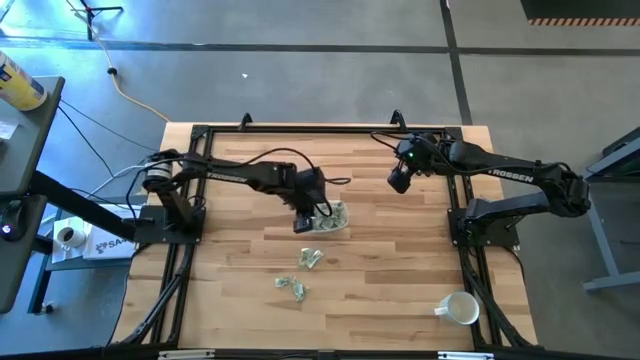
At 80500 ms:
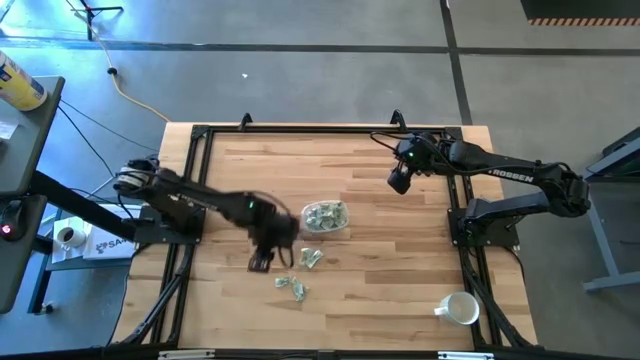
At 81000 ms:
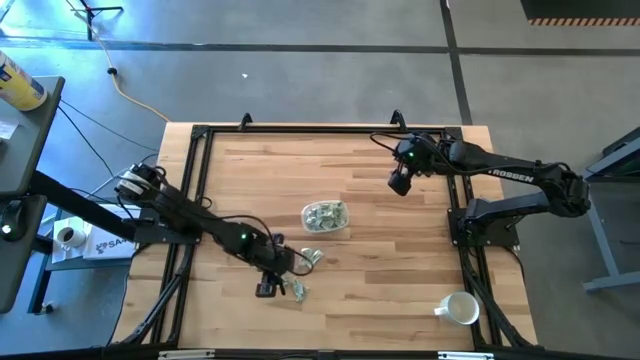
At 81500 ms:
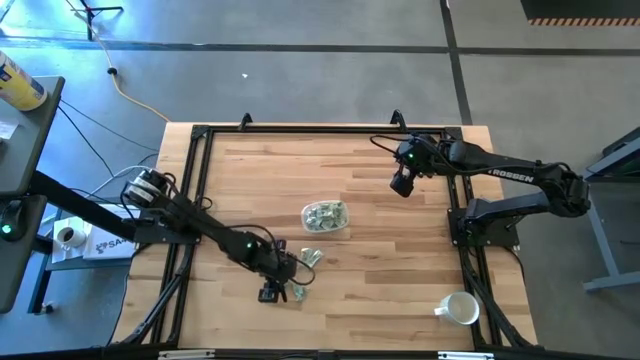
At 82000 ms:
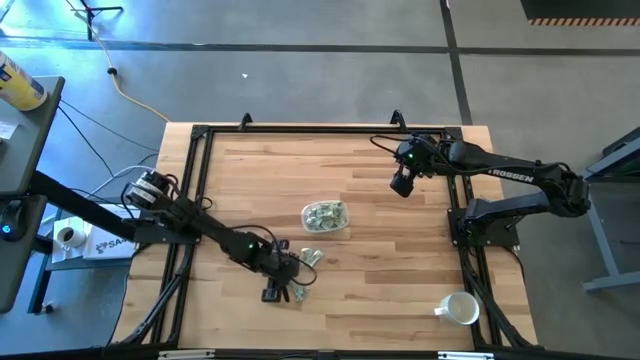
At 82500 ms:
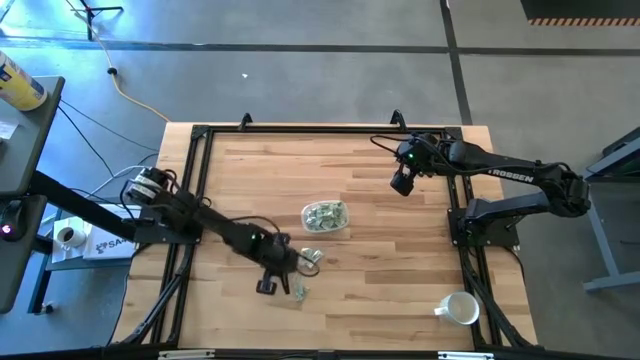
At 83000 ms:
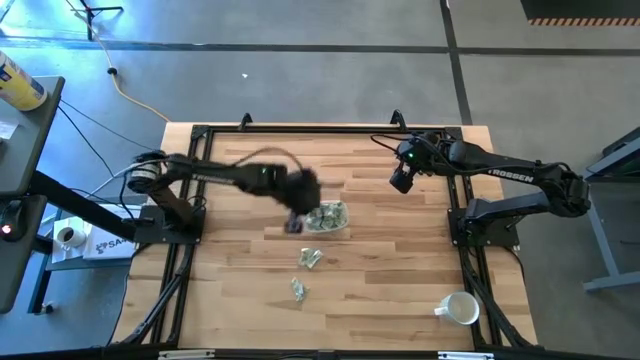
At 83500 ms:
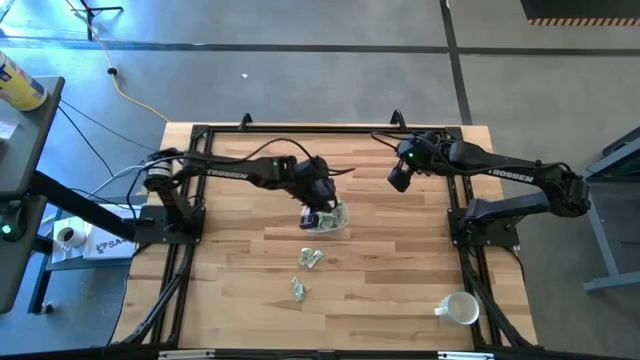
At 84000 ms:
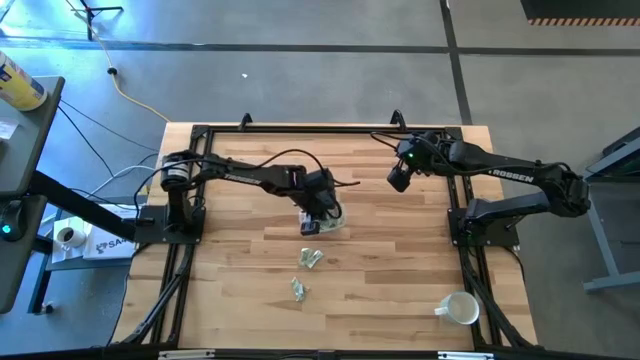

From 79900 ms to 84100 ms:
Task: Pick and place Stevia / Truvia into bins
Put the stevia packet into the transparent container

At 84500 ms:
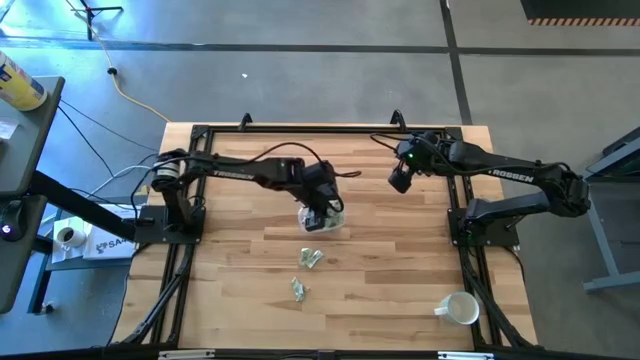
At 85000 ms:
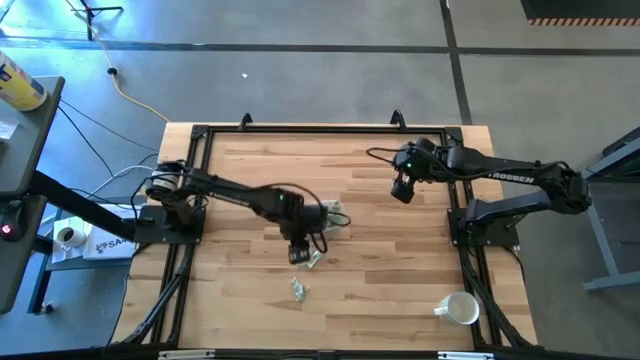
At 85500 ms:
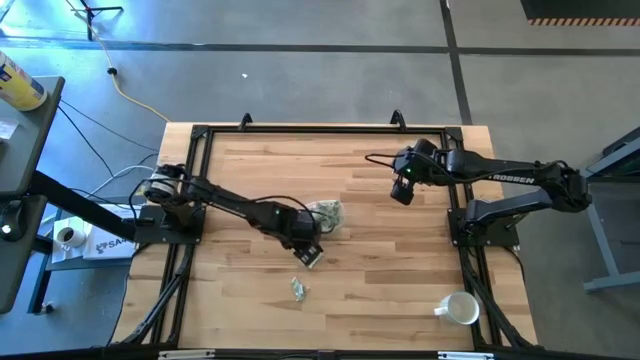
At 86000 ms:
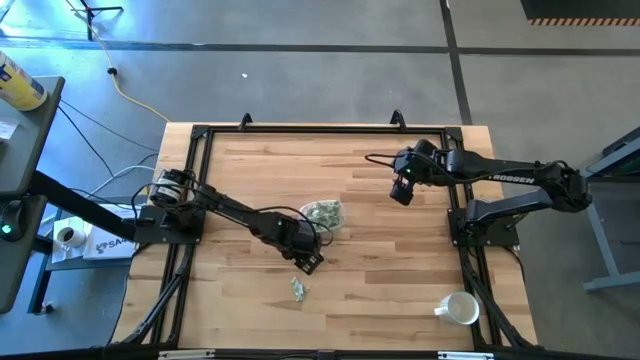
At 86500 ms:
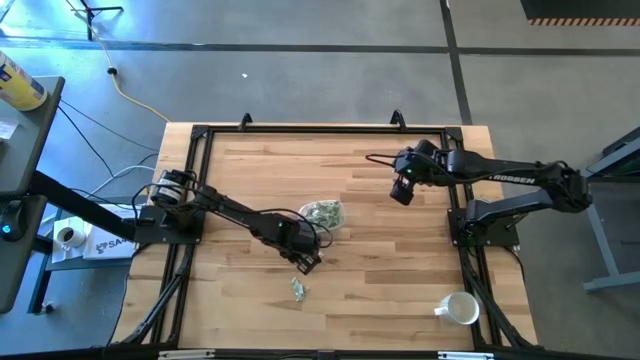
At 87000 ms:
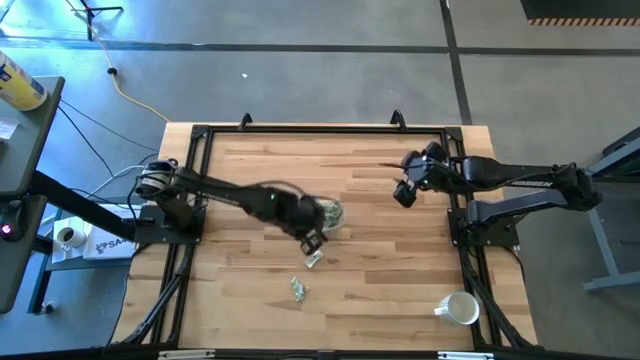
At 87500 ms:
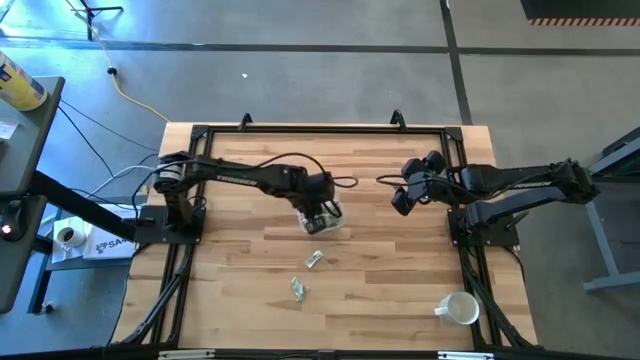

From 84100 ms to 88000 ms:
Put the stevia packet into the transparent container

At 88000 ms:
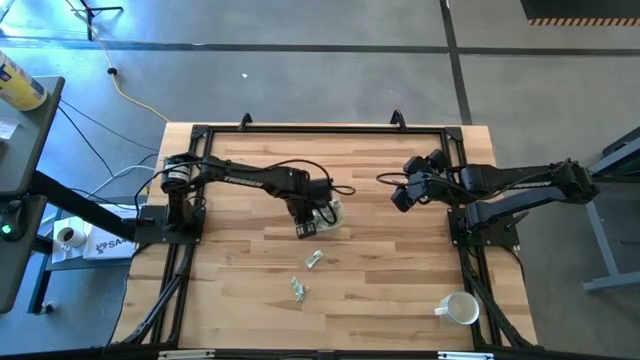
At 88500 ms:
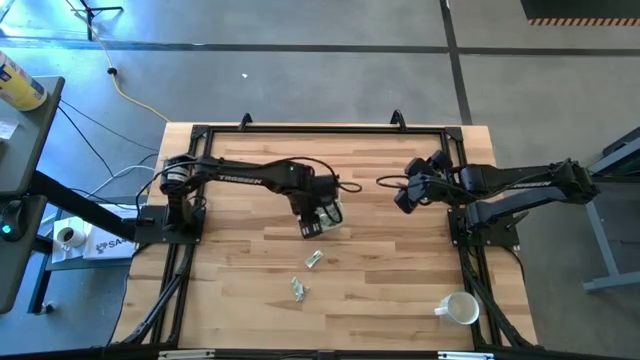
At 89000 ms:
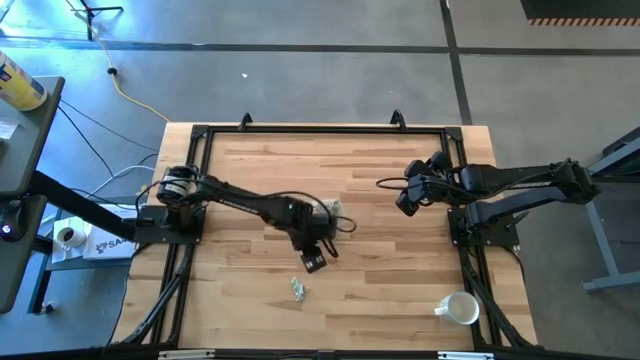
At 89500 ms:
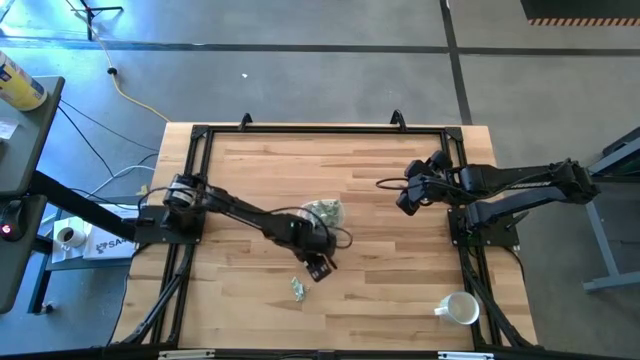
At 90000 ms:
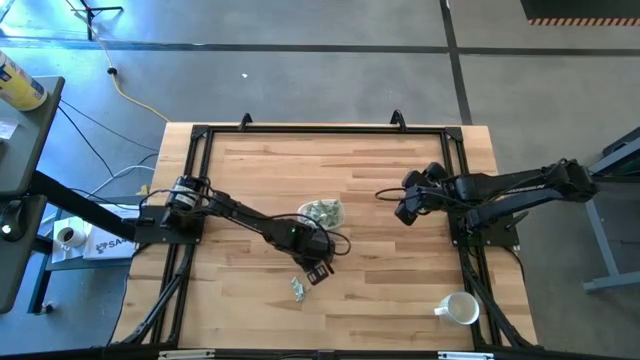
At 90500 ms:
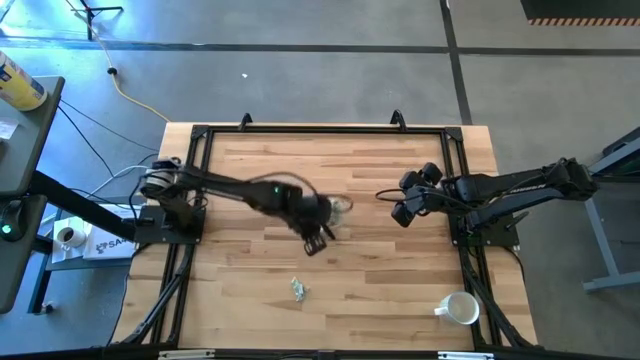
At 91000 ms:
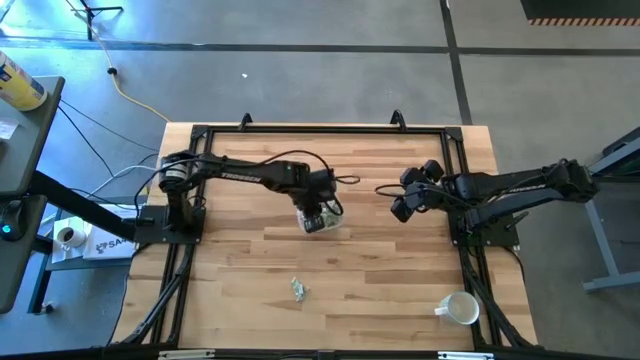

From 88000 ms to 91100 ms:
Put the stevia packet into the transparent container

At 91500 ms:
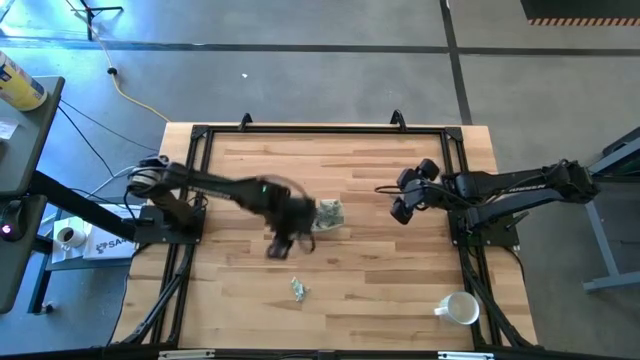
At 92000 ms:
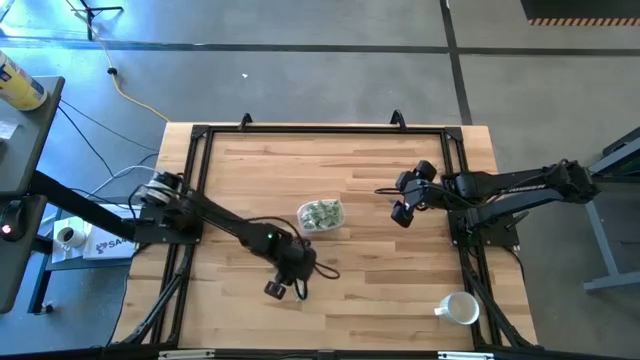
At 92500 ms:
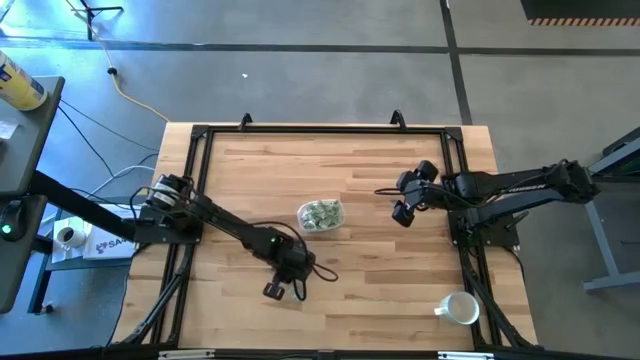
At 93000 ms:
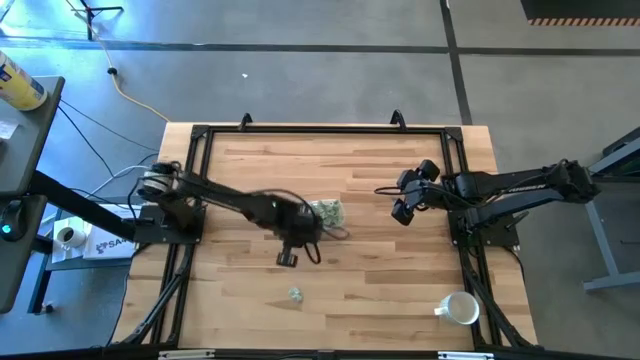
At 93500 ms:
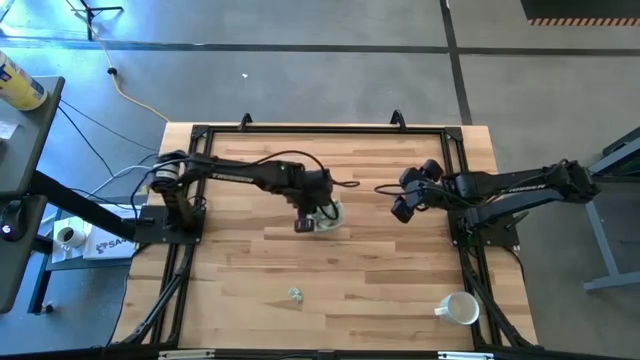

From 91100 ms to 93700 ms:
Put the stevia packet into the transparent container

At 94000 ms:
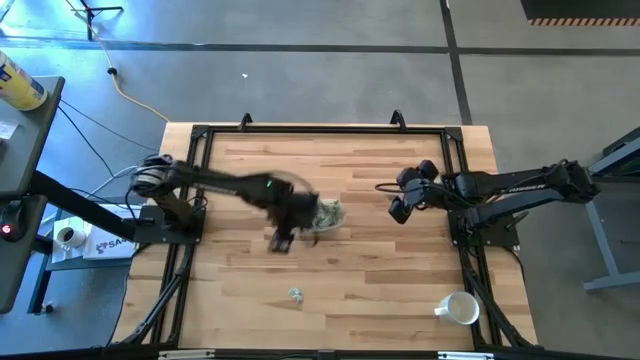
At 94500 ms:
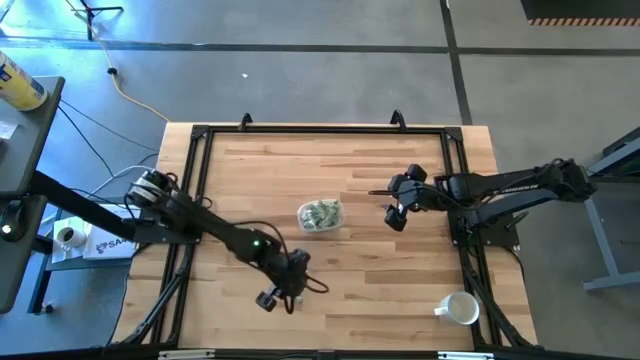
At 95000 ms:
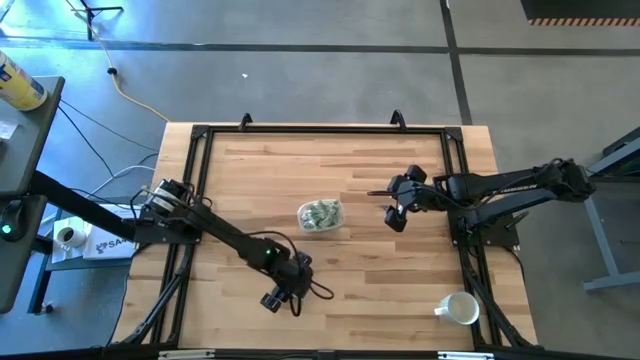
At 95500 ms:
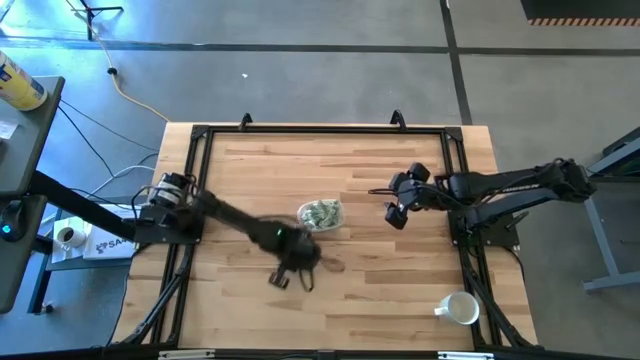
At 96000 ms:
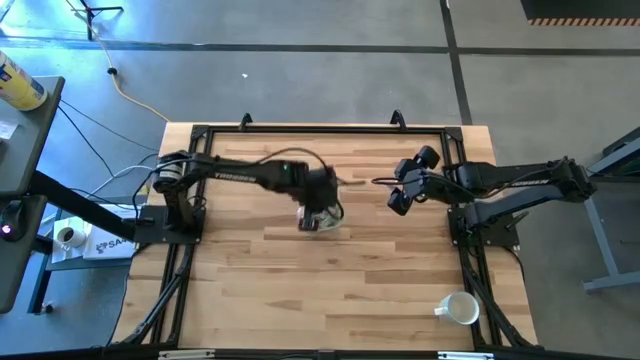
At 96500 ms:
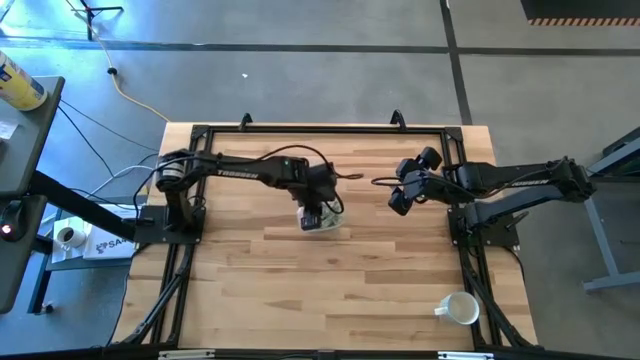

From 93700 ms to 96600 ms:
Put the stevia packet into the transparent container

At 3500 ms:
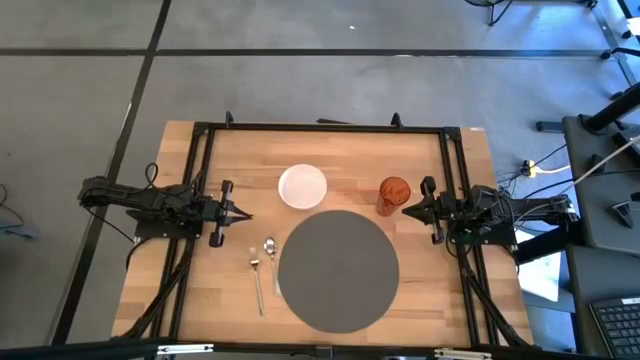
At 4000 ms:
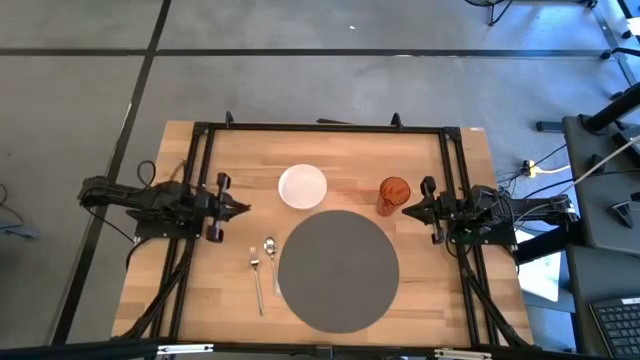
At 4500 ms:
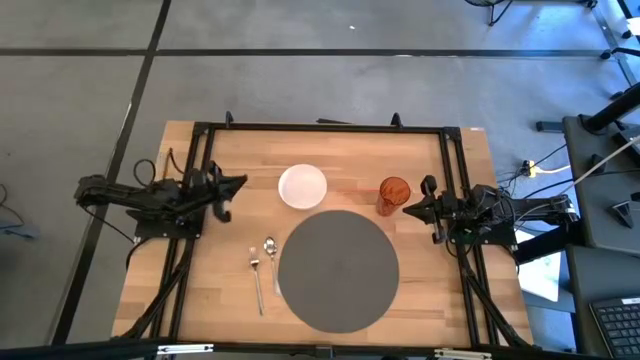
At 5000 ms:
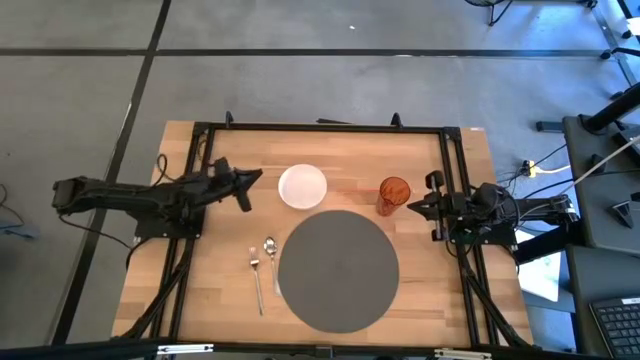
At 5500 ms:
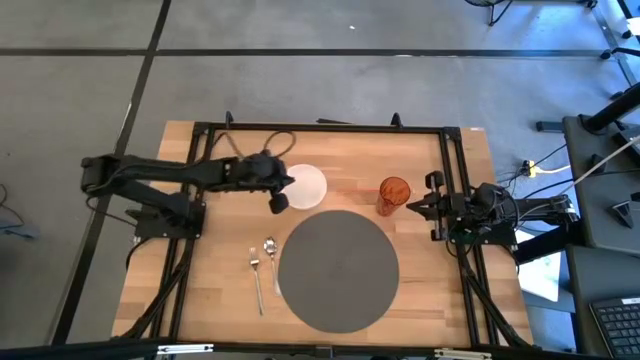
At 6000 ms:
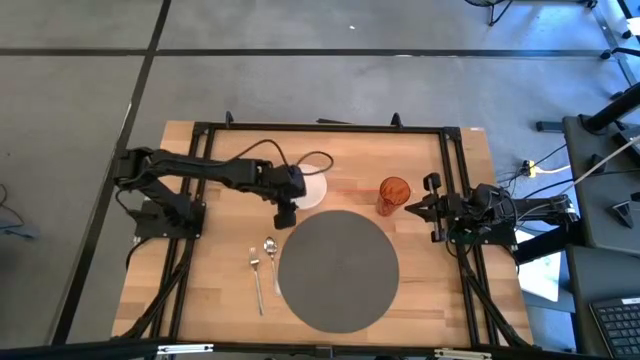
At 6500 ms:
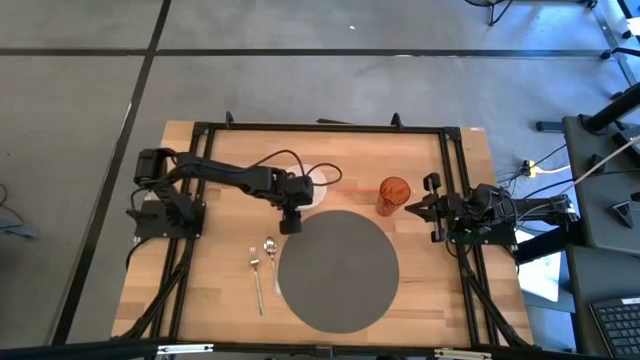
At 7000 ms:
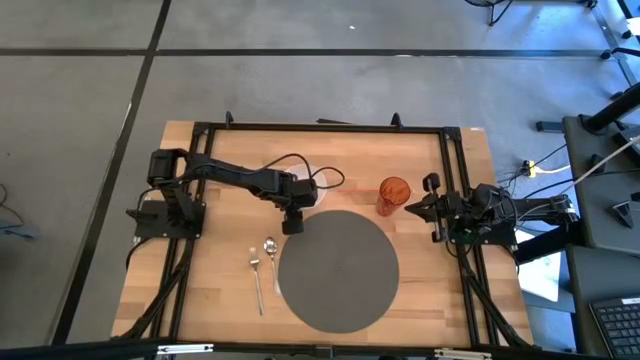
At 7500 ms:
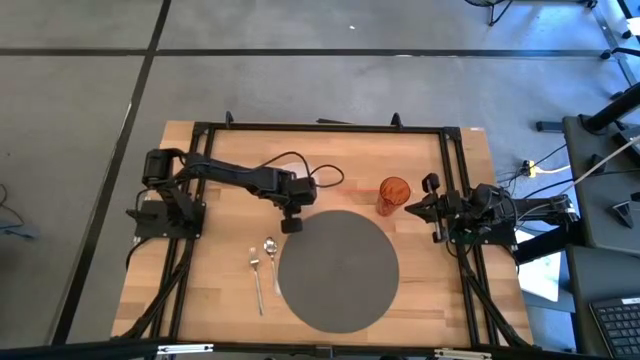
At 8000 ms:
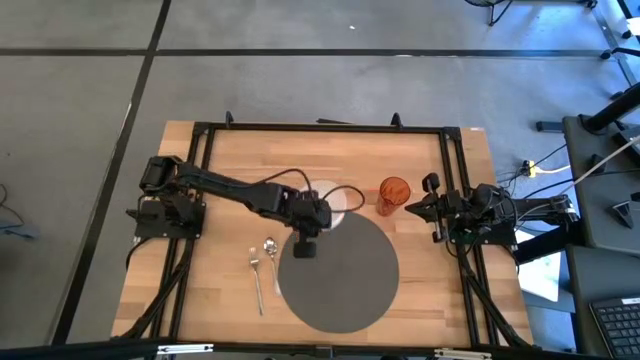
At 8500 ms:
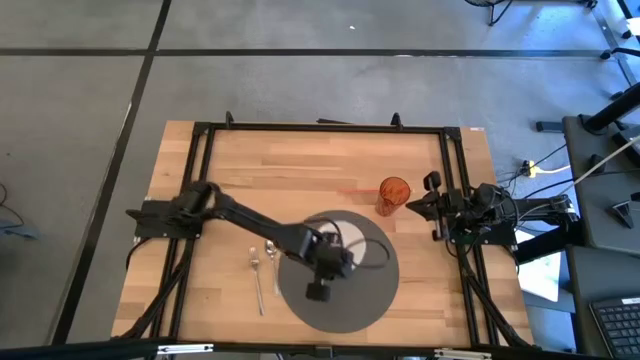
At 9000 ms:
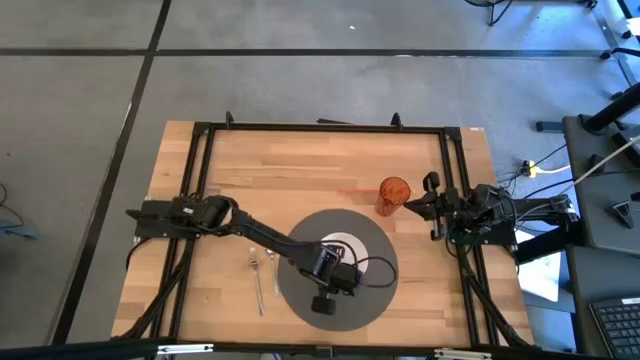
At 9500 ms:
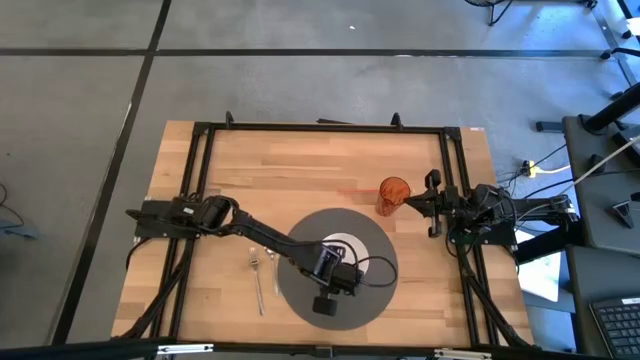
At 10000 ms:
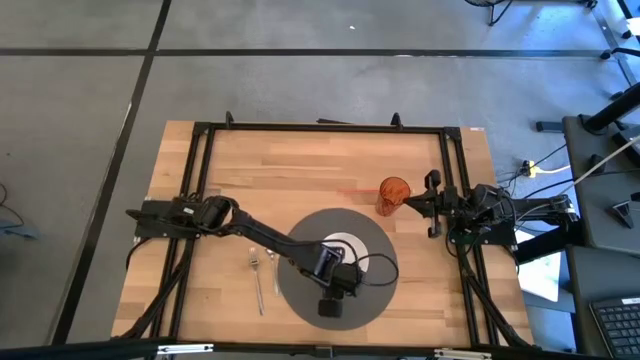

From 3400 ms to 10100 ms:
Task: Pick & Place Utensil
Put the white bowl on the center of the gray mat
